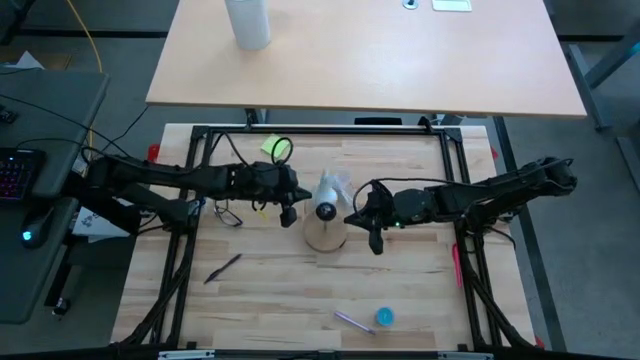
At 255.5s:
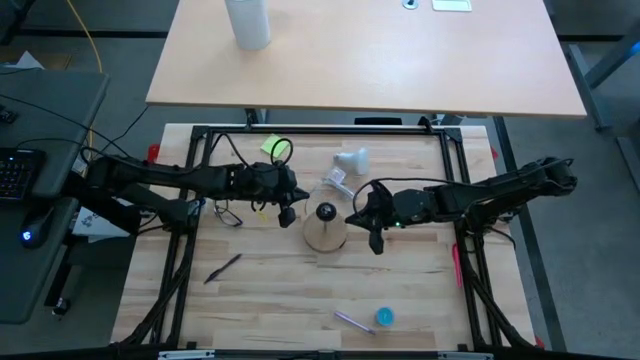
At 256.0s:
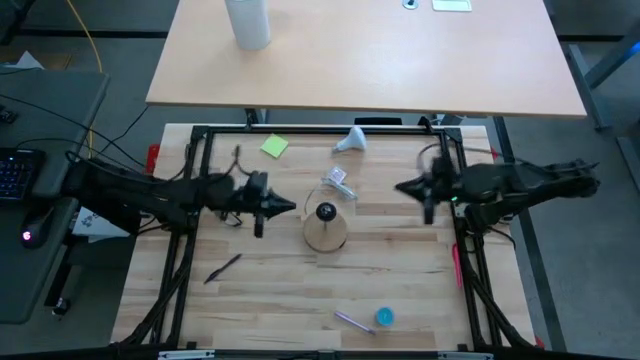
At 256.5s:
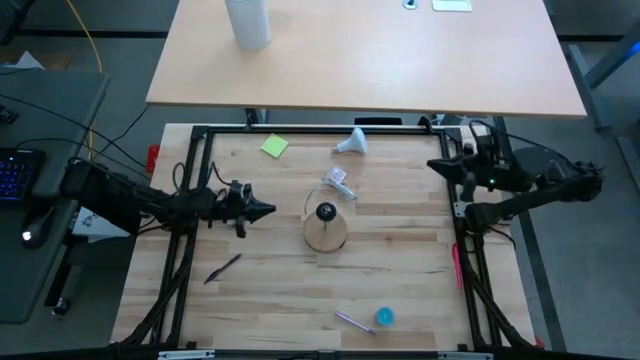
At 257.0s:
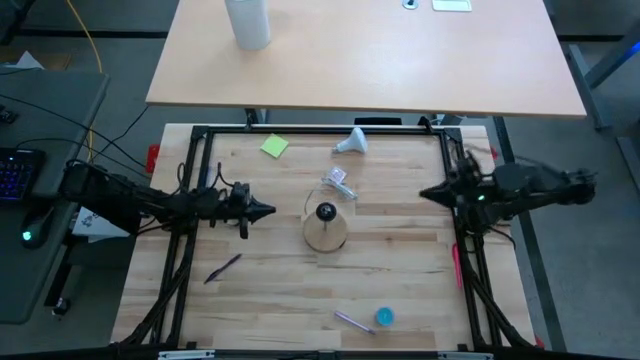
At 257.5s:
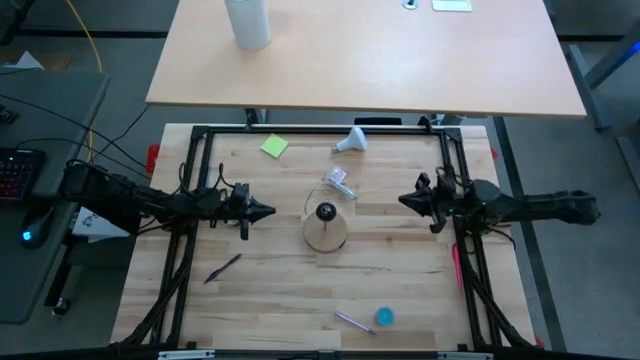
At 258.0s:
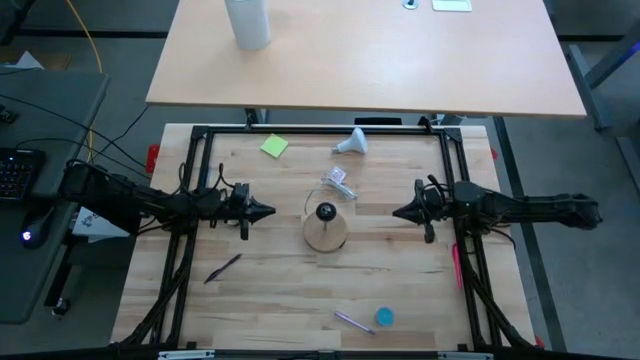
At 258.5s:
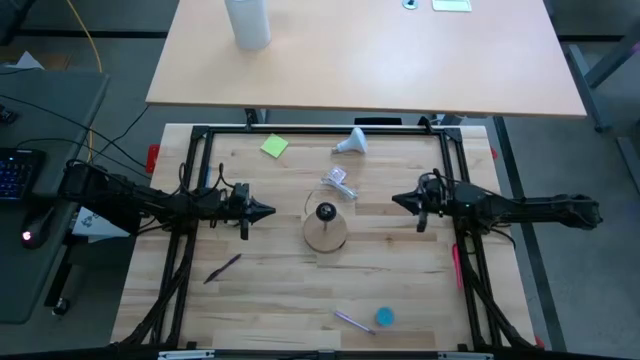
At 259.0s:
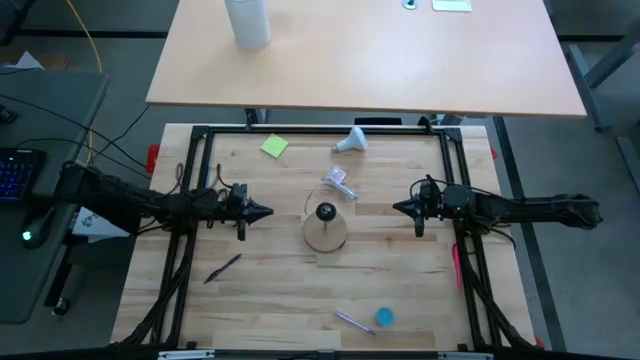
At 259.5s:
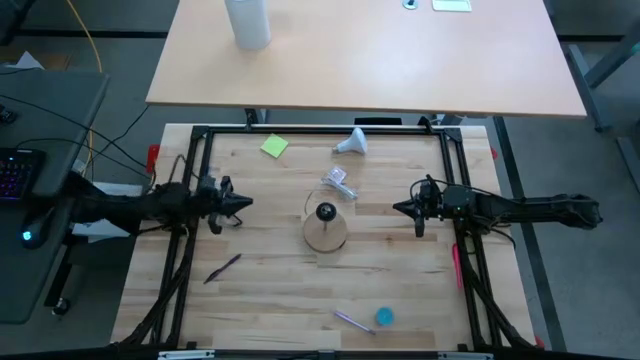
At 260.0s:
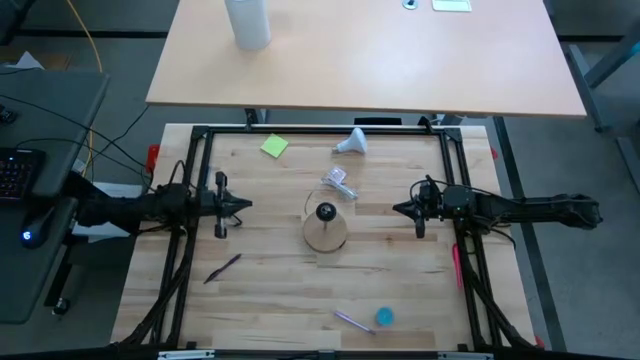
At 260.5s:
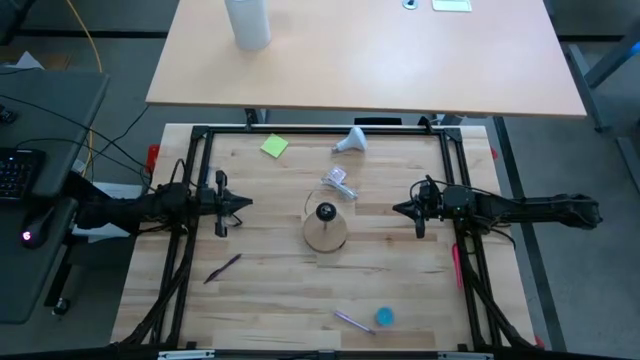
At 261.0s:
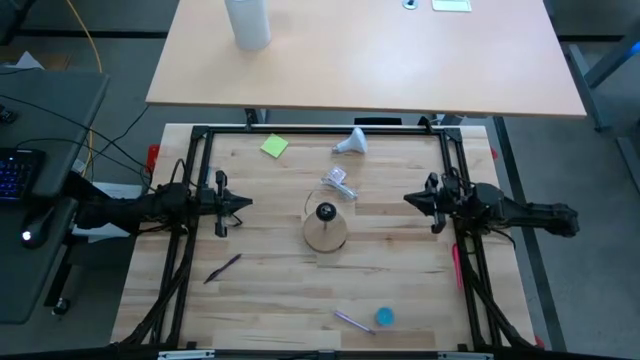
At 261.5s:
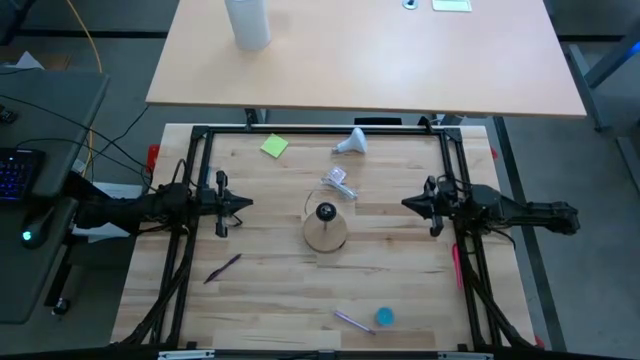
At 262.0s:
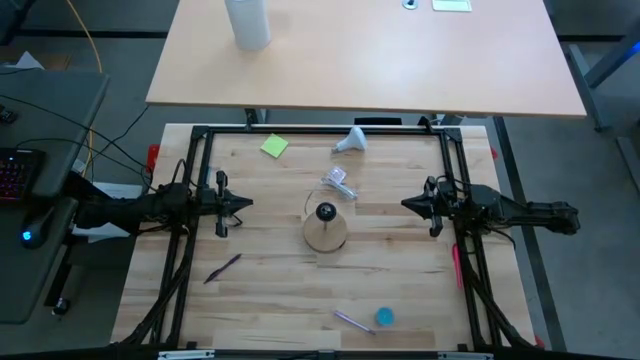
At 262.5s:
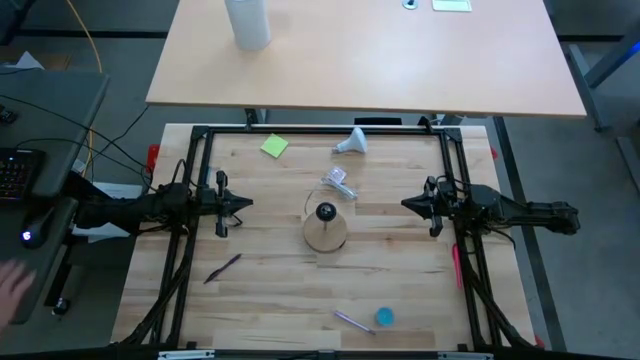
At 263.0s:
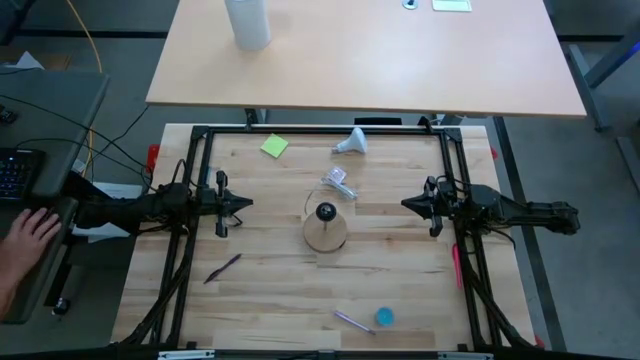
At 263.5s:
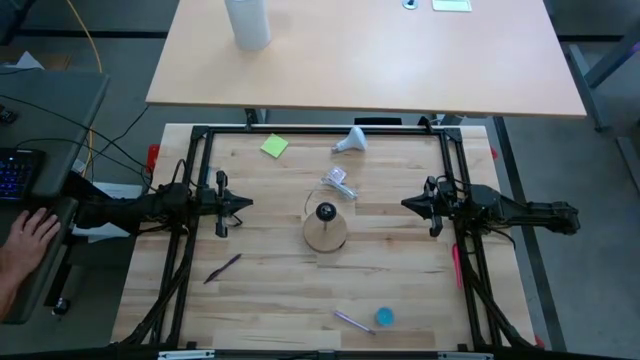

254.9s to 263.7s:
Task: Screw lightbulb
Return to Home Position

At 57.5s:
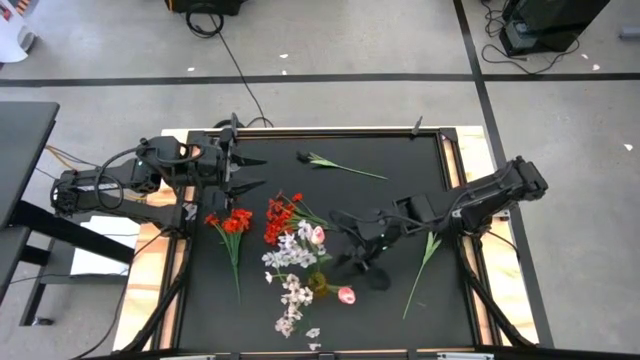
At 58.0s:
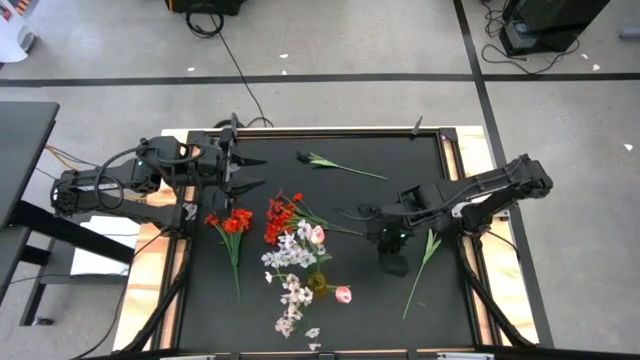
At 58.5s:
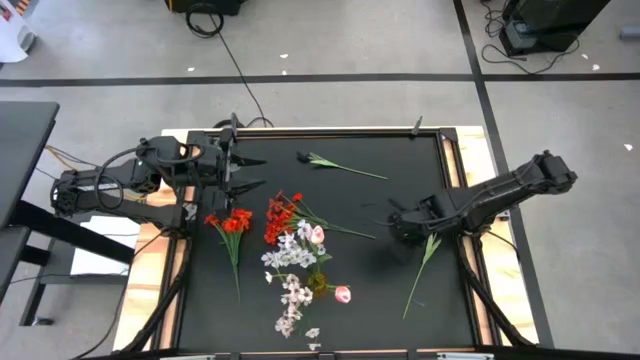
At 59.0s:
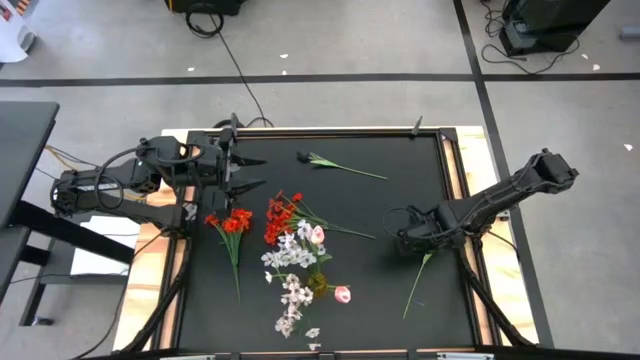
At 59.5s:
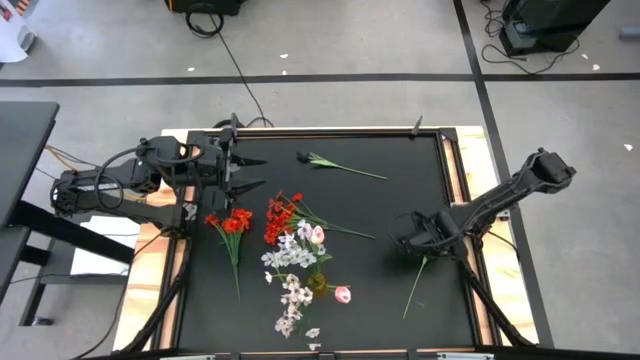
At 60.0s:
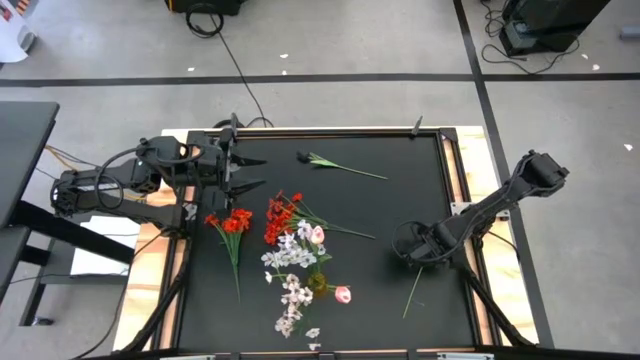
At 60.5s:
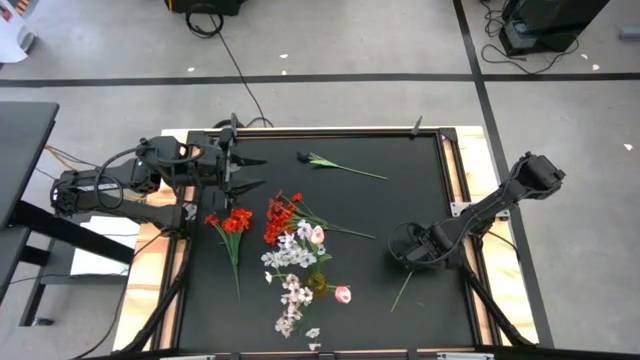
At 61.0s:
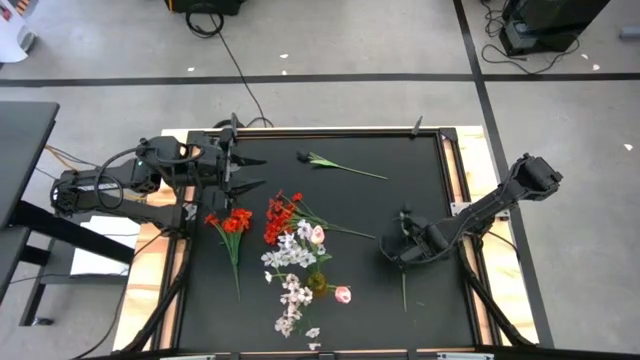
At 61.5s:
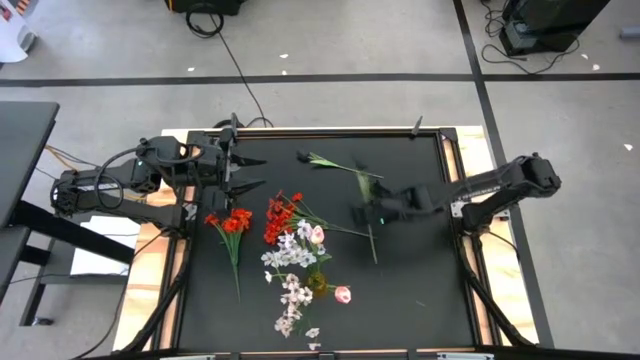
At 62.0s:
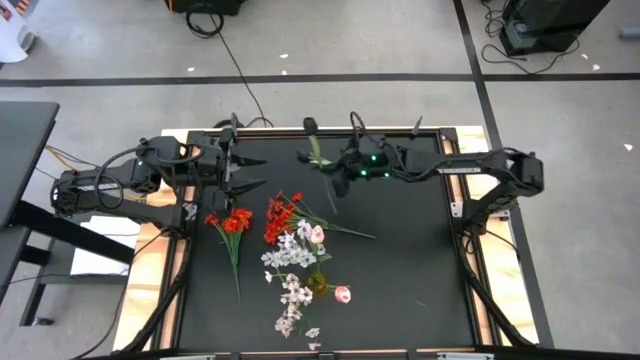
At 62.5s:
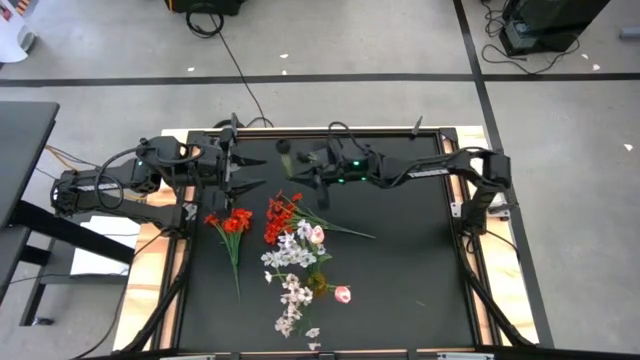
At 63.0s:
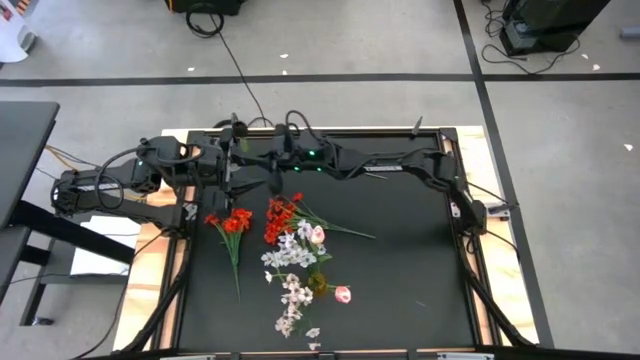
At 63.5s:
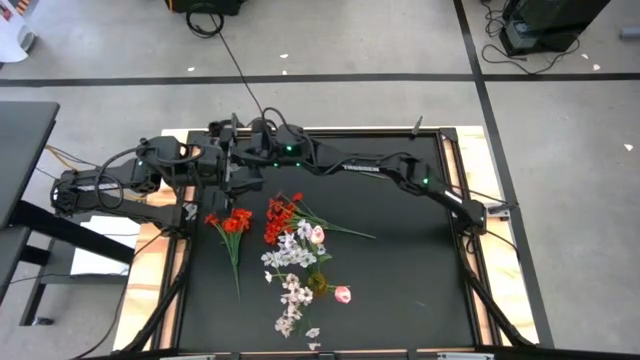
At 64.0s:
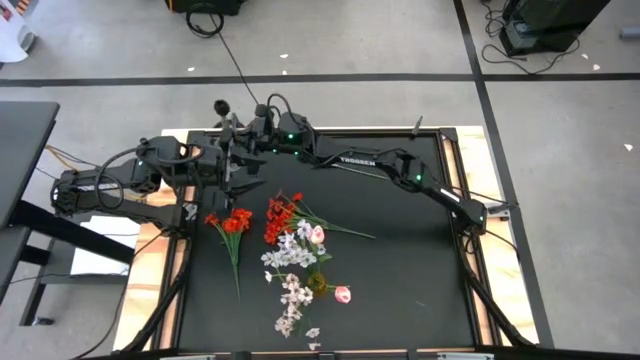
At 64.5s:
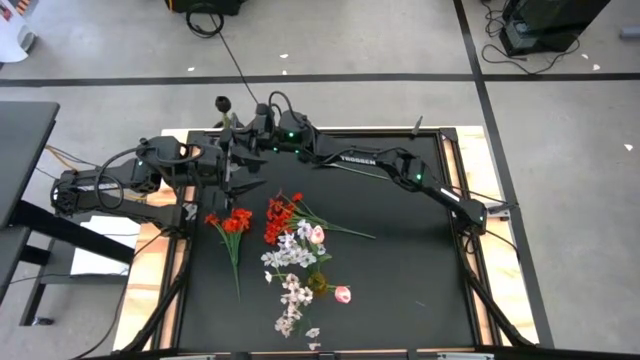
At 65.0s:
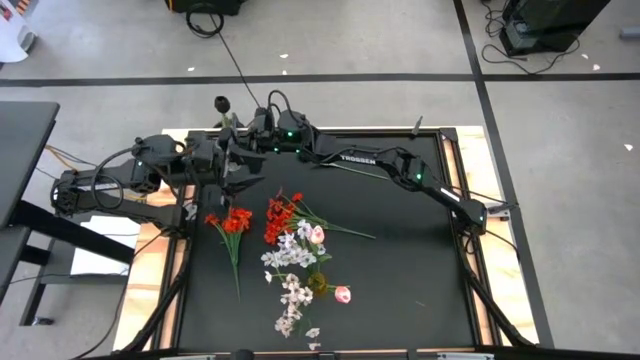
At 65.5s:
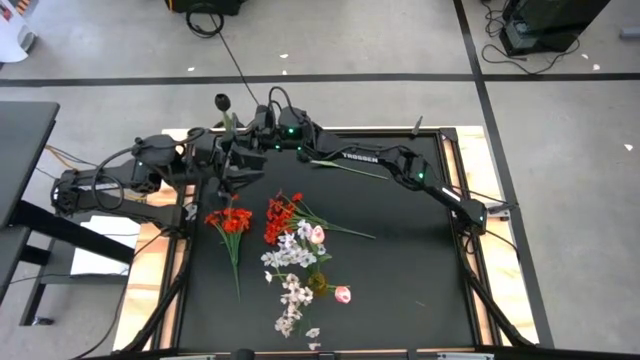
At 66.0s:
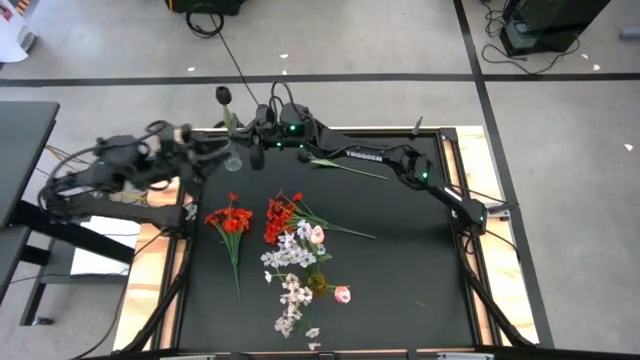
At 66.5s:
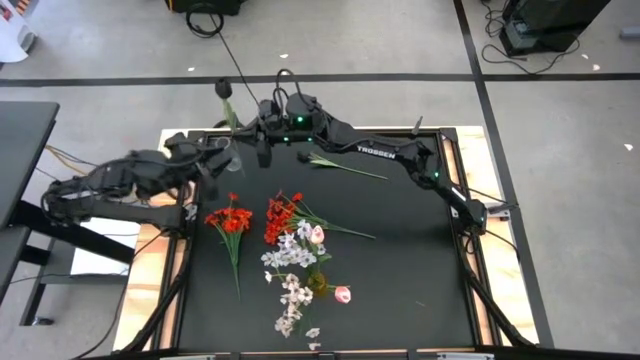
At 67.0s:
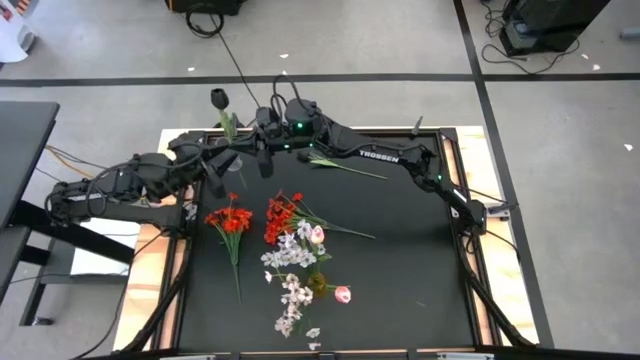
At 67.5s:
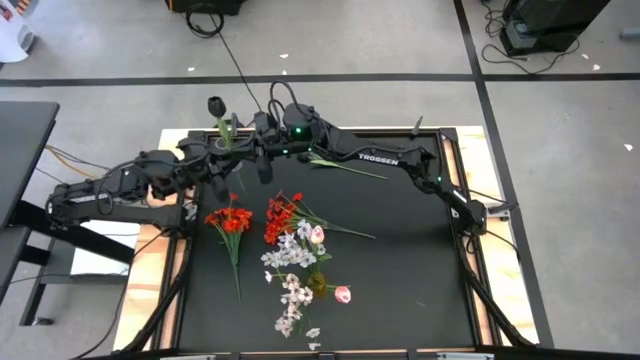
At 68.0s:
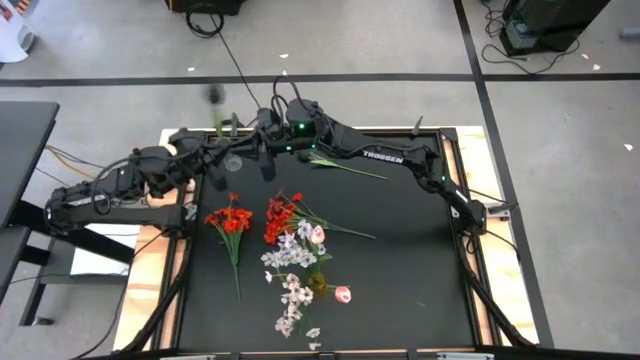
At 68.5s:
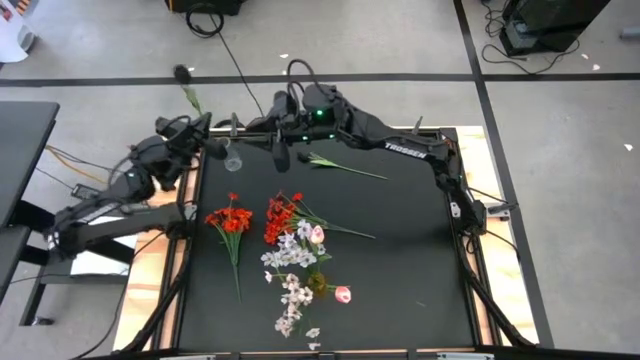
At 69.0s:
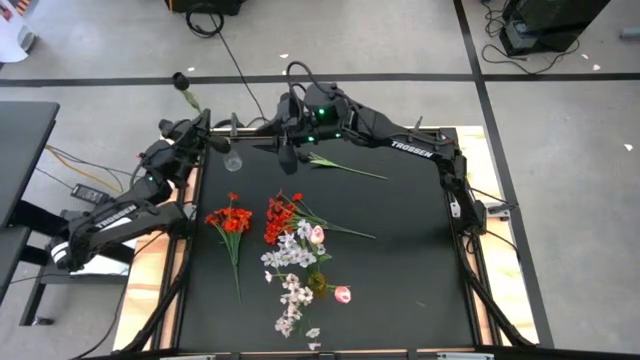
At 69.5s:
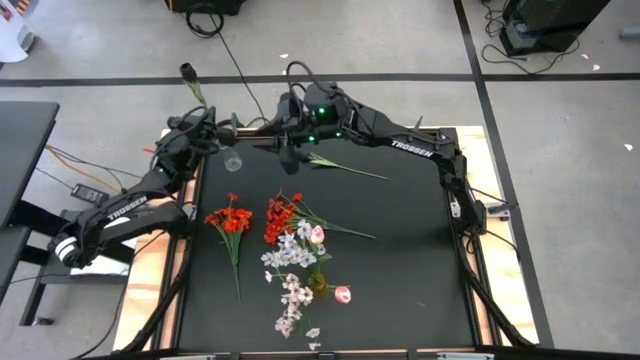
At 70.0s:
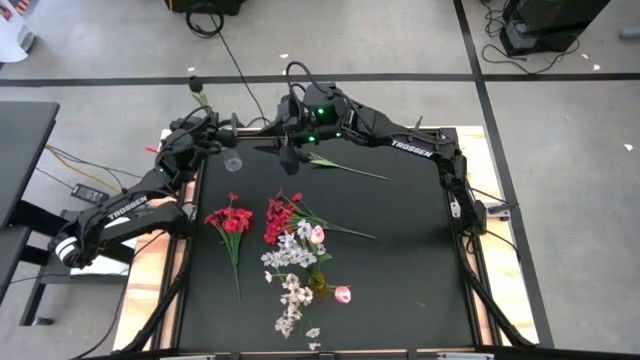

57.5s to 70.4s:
Task: Sort flowers into vase by color
Put the bottom black flower into the transparent vase
